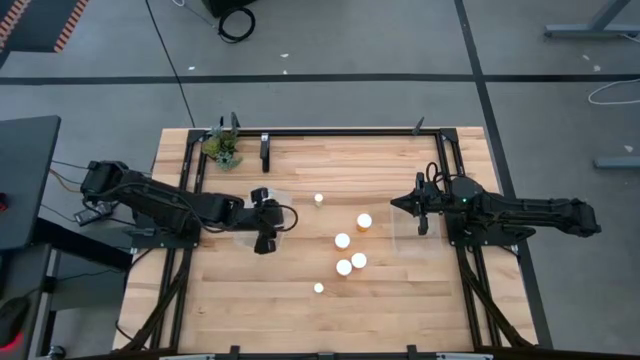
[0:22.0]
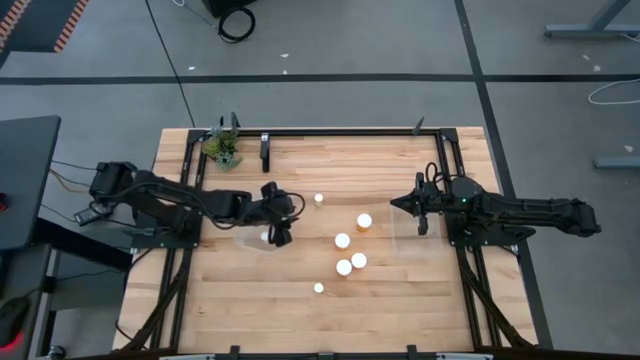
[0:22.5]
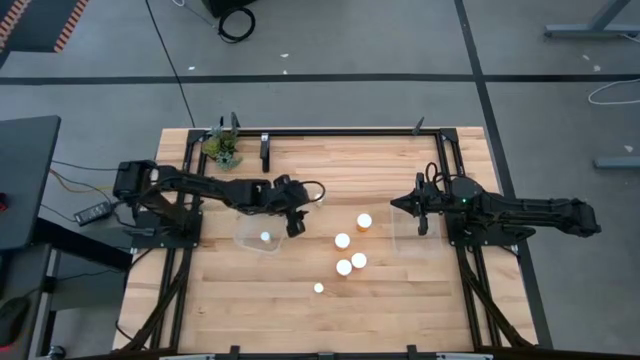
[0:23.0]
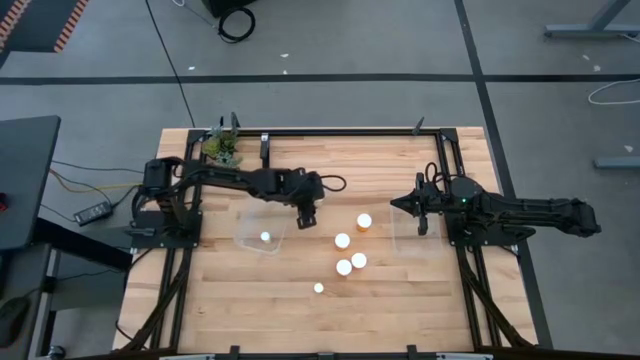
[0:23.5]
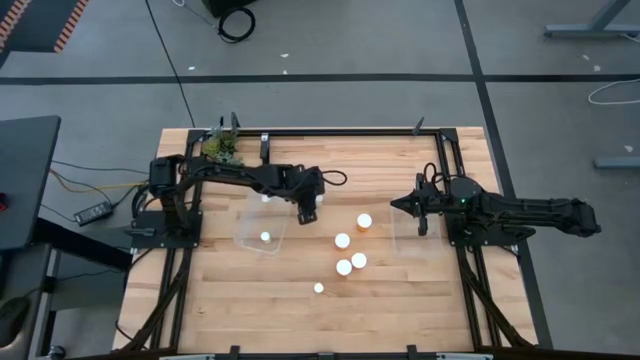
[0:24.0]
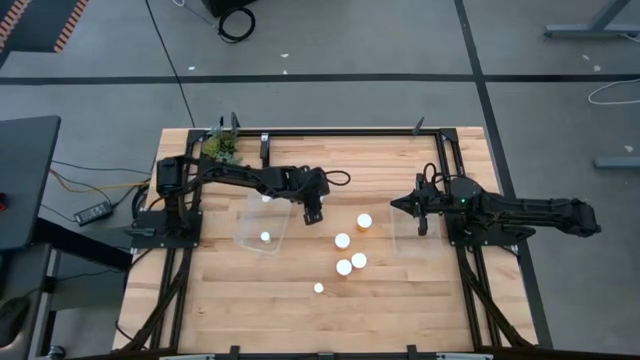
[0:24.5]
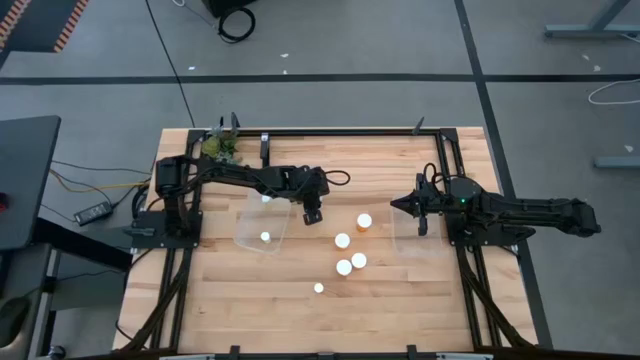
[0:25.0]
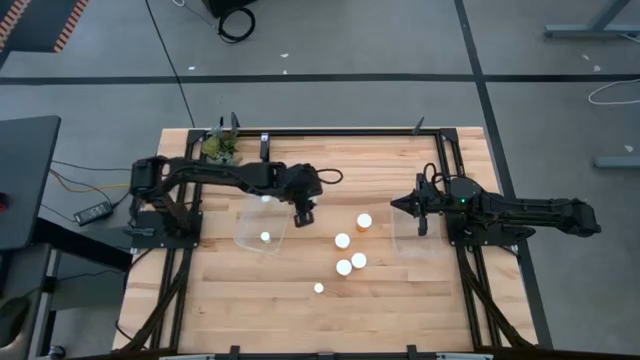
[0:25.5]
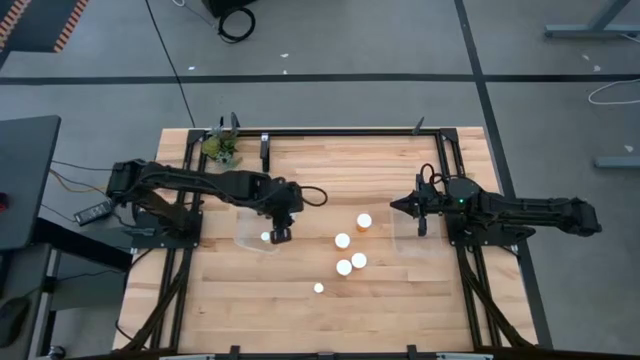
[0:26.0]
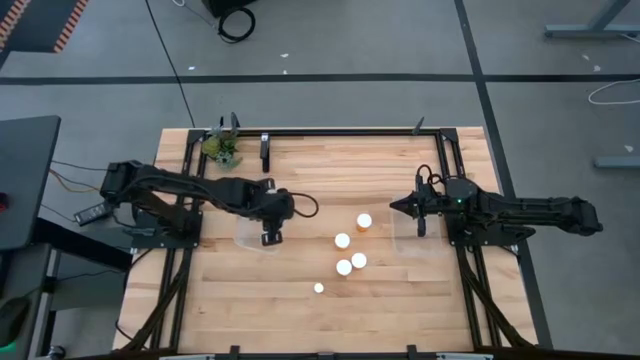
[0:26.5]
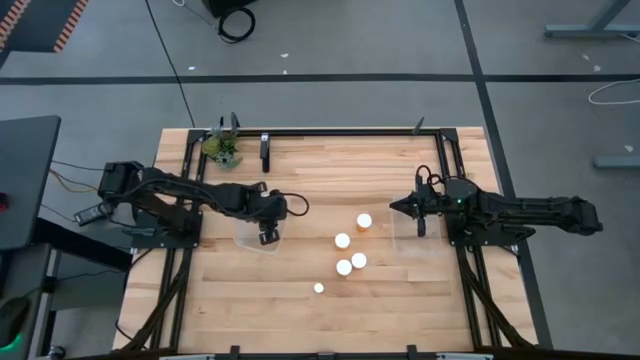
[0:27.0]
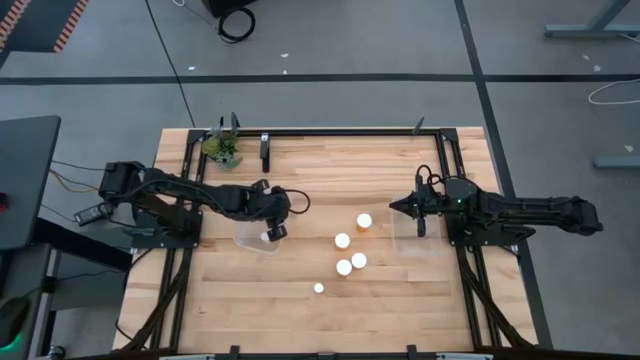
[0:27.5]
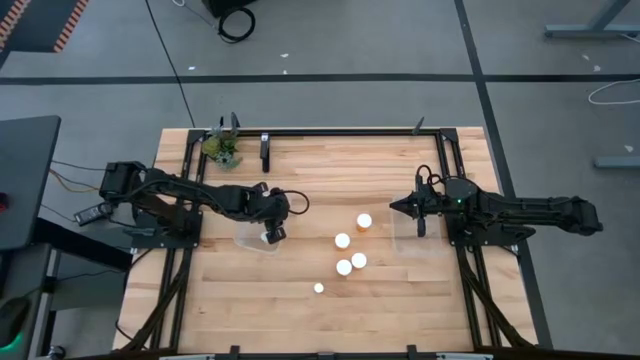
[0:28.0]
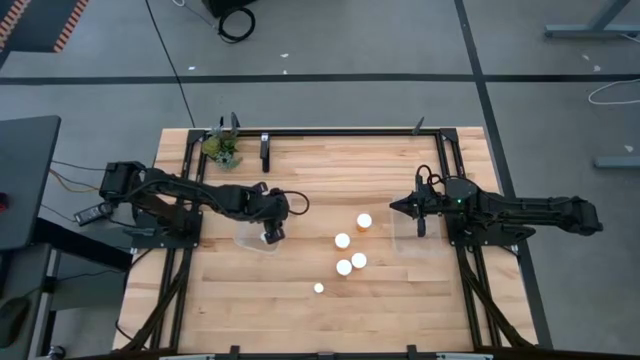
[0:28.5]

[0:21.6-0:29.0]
Task: Pick and place medicine bottles into bin by pill shape (circle, oval)
Put the yellow tablet bottle into the left transparent bin

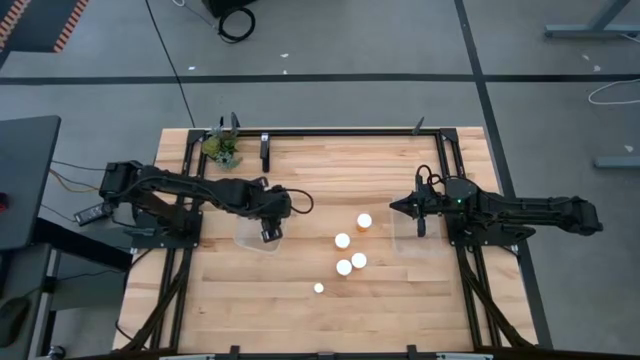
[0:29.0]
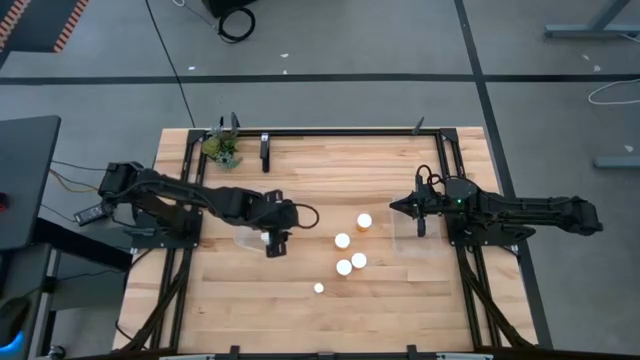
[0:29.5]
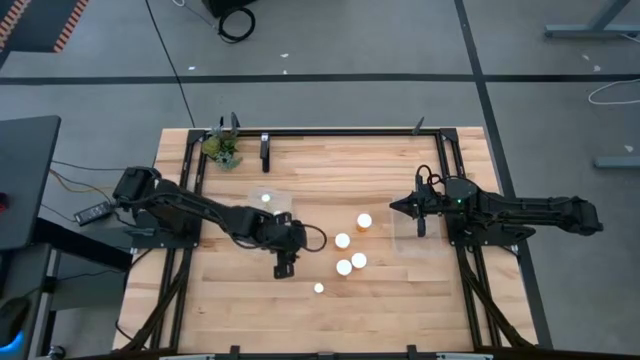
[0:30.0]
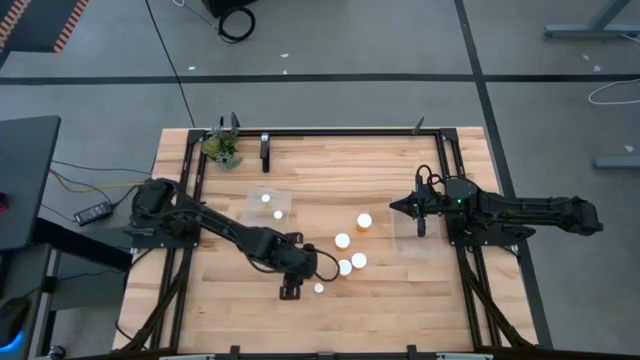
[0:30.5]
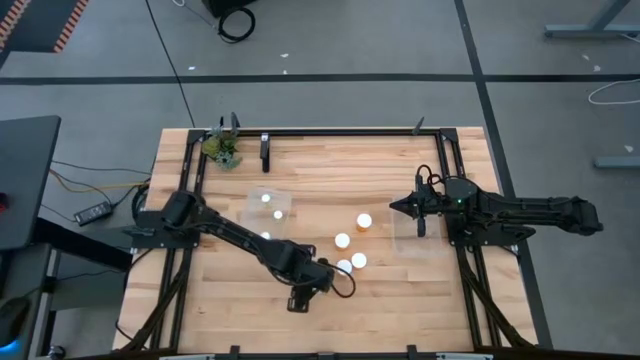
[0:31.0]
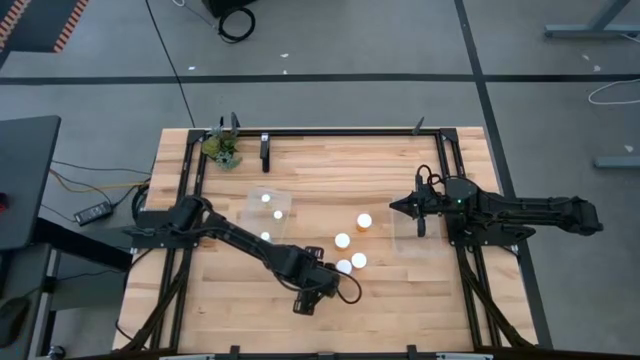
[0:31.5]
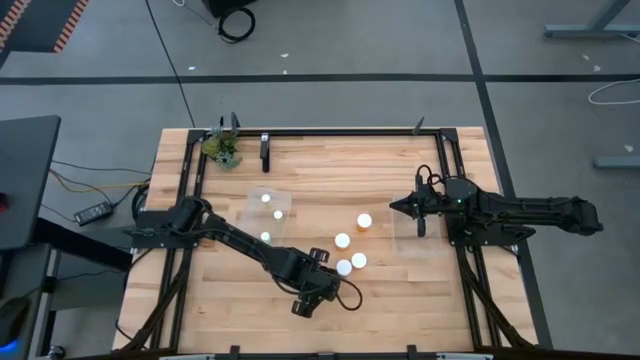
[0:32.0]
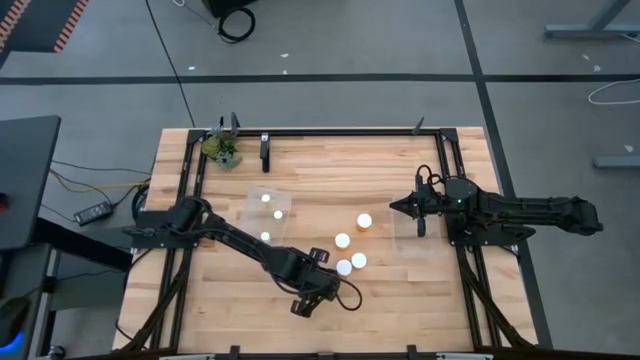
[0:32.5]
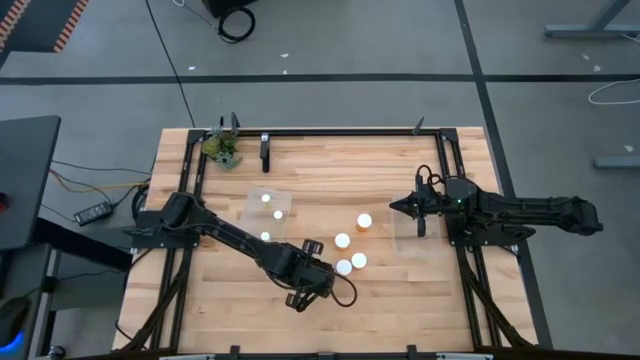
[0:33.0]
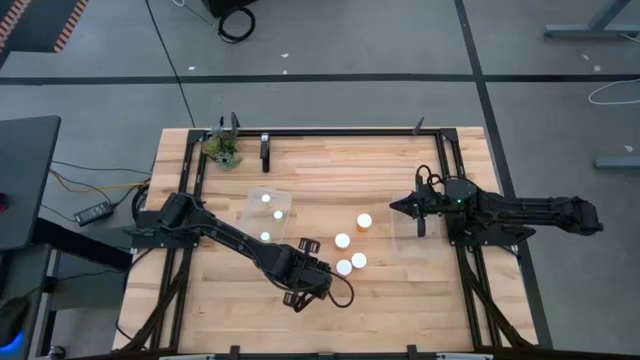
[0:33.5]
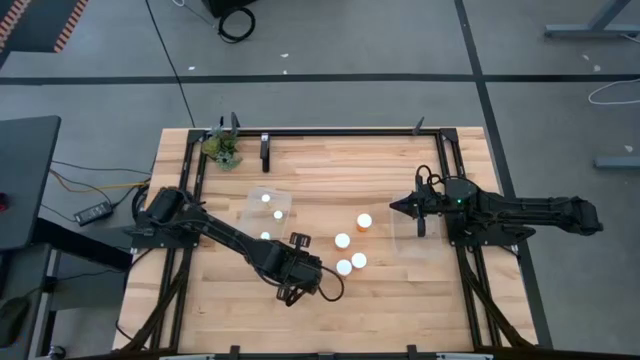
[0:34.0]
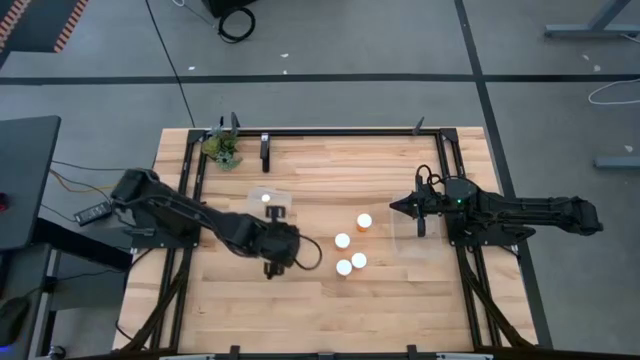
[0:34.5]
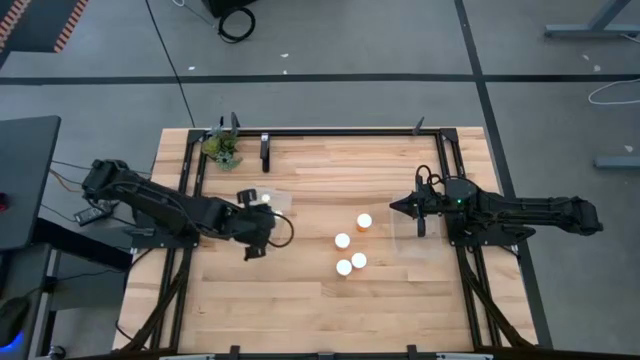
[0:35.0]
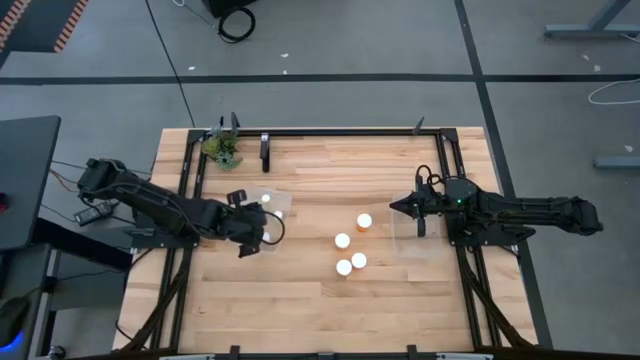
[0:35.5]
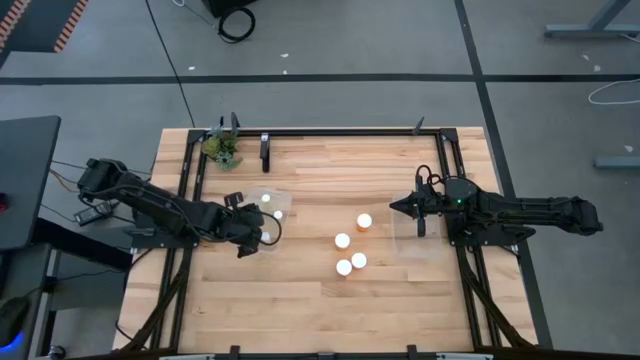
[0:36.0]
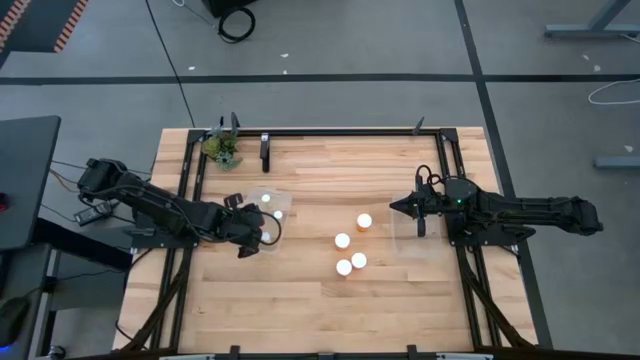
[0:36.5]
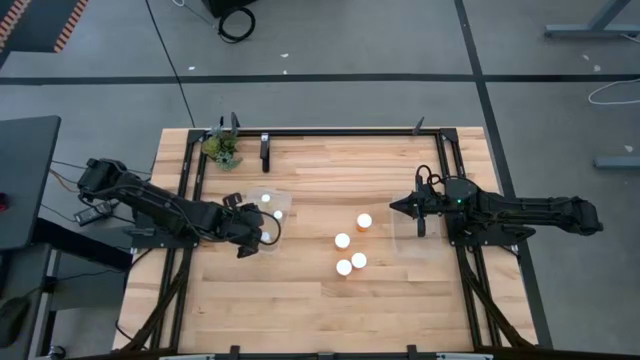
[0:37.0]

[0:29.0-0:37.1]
Put the orange tablet bottle into the left transparent bin

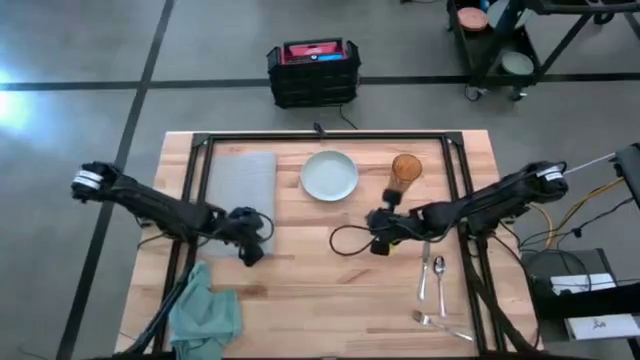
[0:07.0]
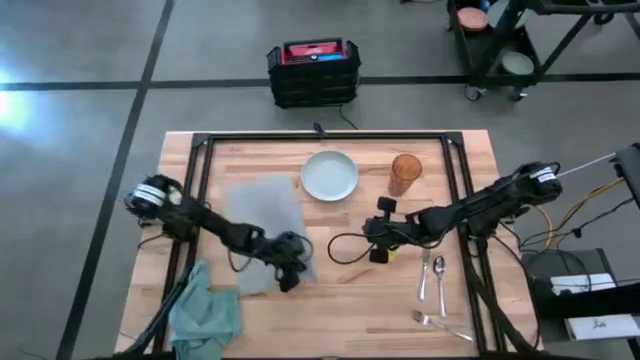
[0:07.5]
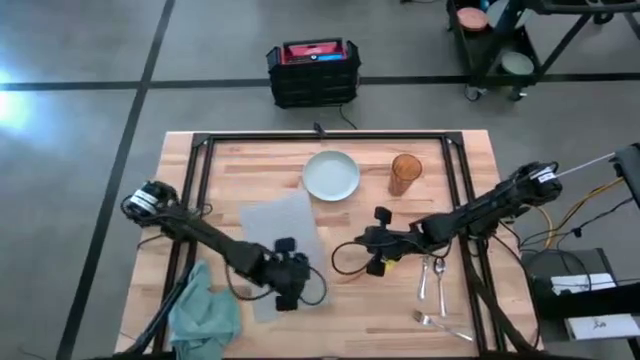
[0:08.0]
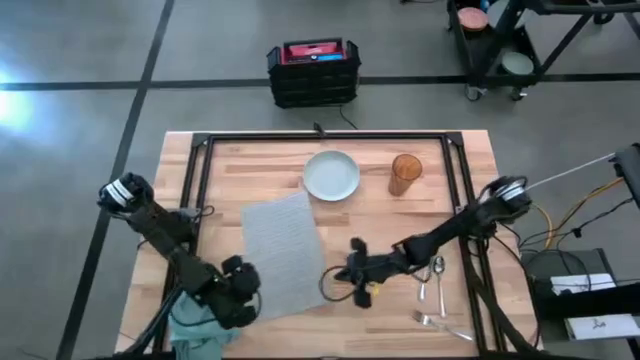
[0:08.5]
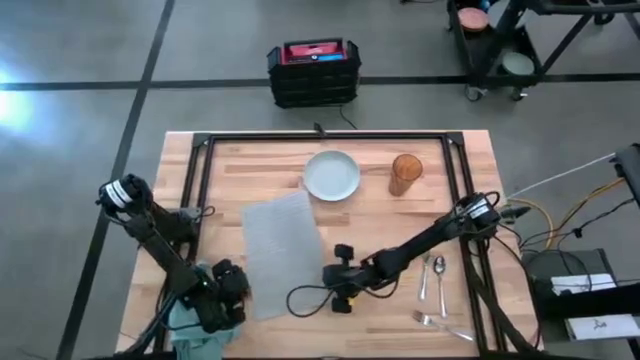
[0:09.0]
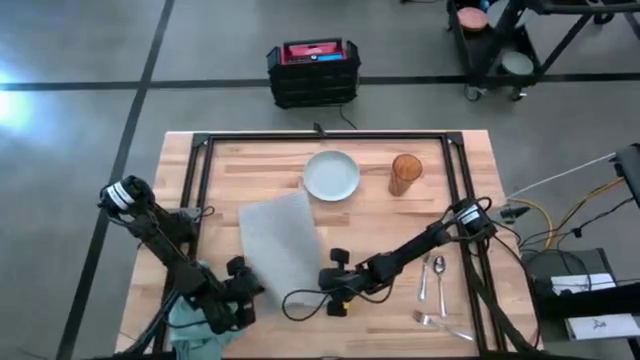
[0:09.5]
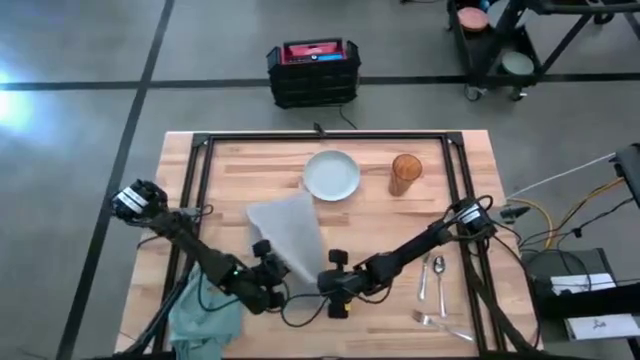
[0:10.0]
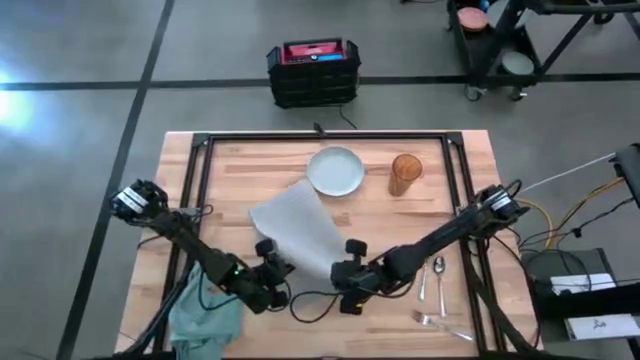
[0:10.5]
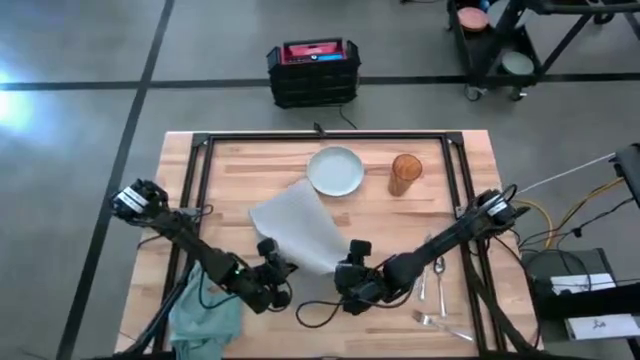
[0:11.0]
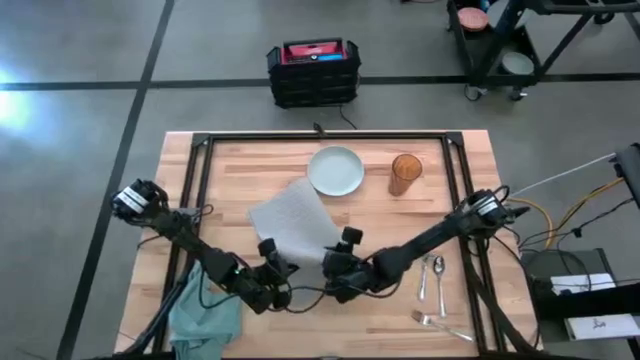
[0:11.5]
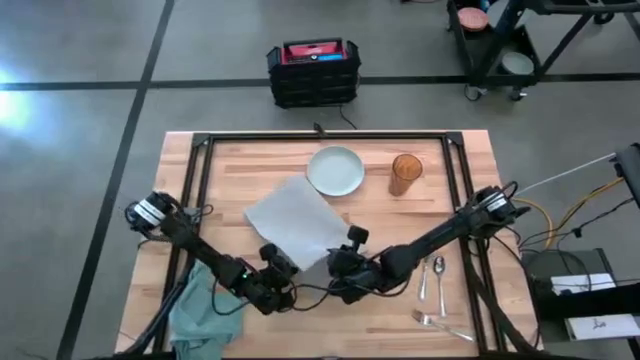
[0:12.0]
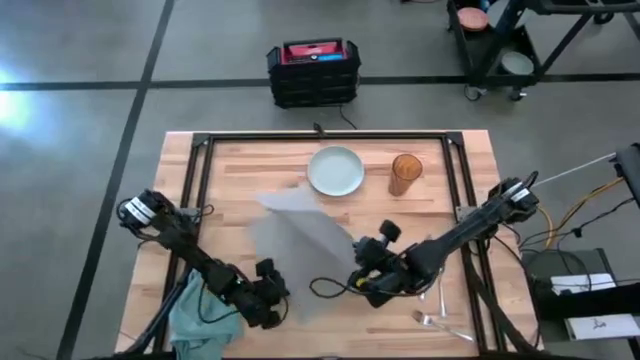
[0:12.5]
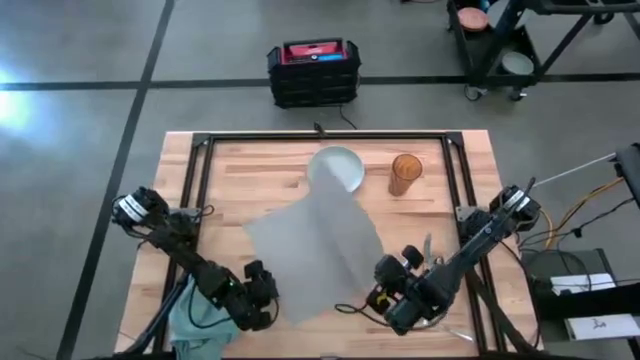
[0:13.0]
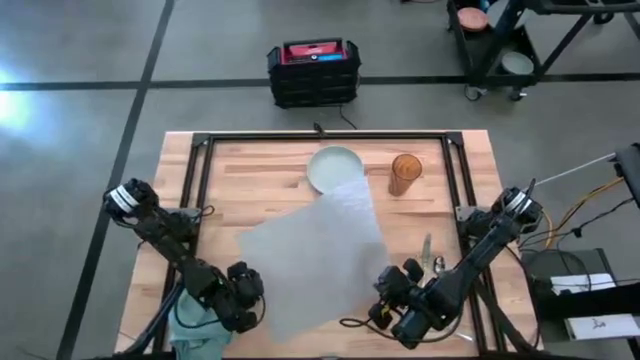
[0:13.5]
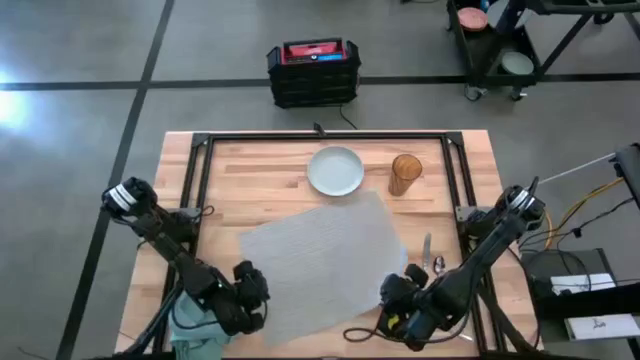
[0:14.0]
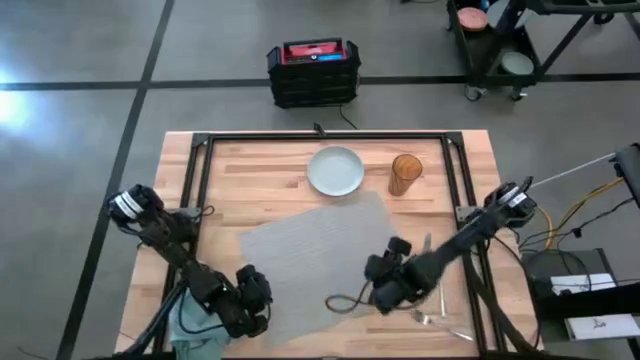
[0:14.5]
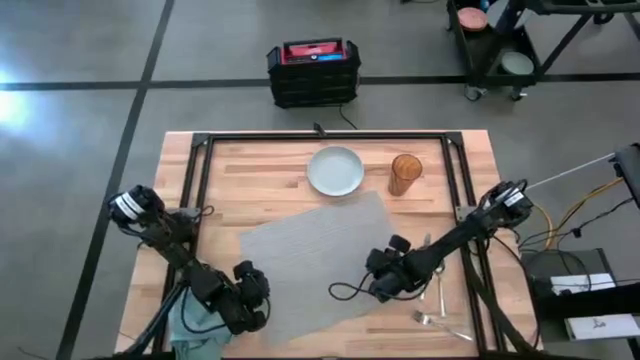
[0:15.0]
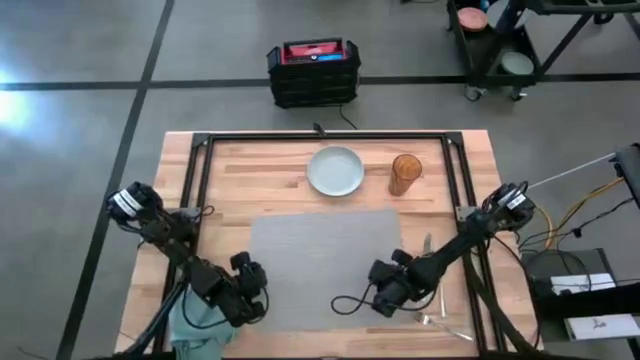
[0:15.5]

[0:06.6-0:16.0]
Task: Set table place
Move the table mat to the center of the table
